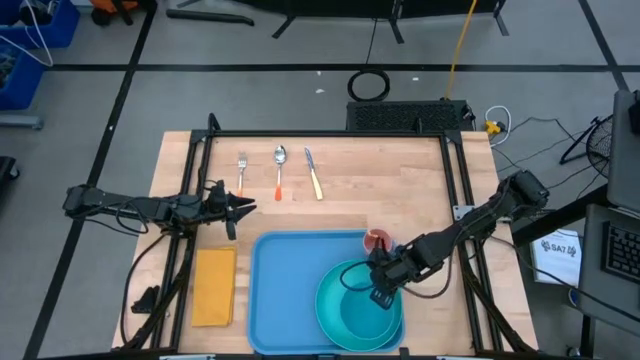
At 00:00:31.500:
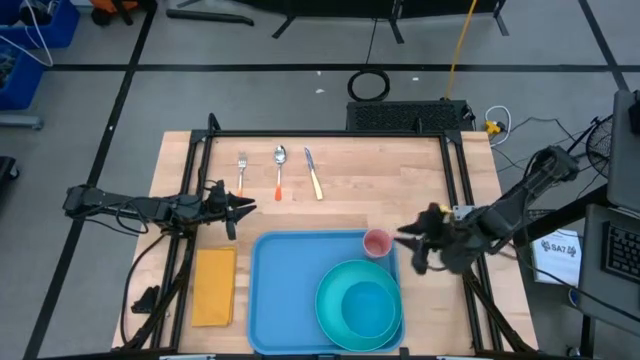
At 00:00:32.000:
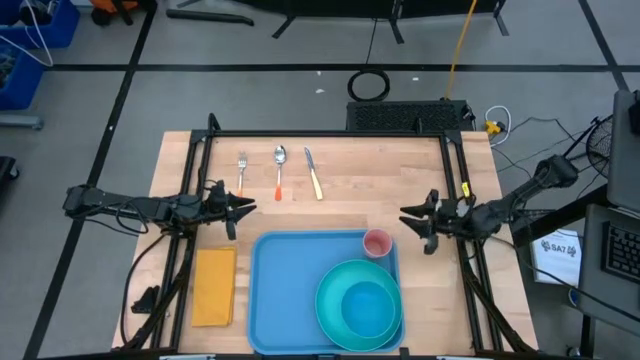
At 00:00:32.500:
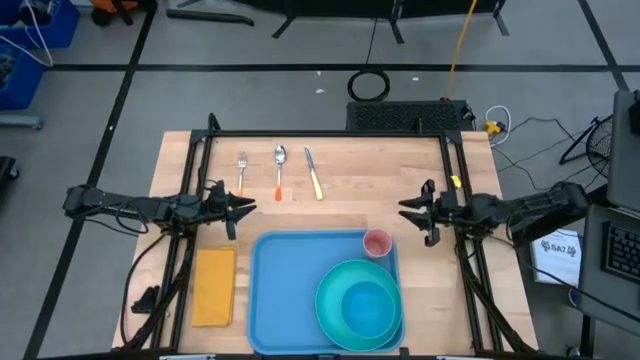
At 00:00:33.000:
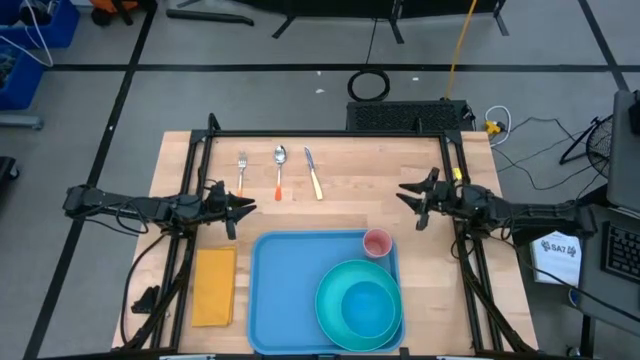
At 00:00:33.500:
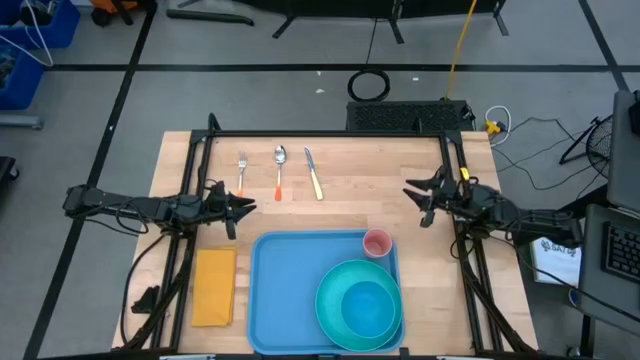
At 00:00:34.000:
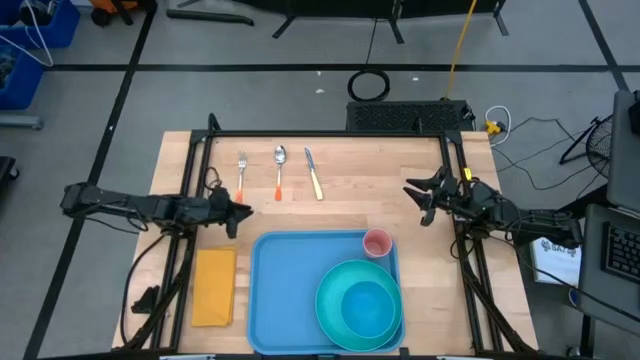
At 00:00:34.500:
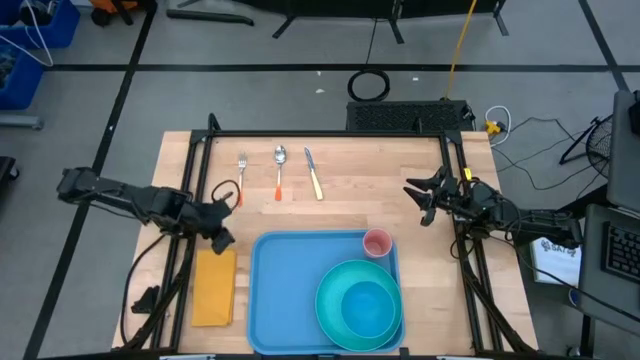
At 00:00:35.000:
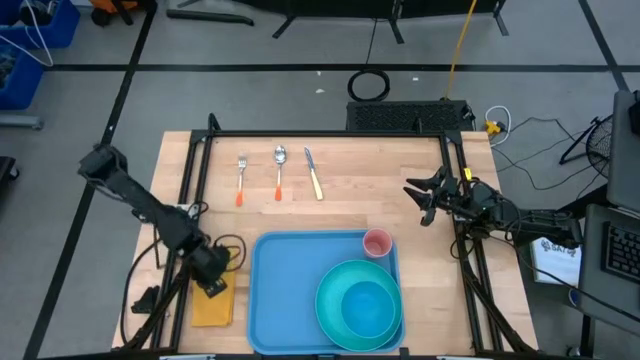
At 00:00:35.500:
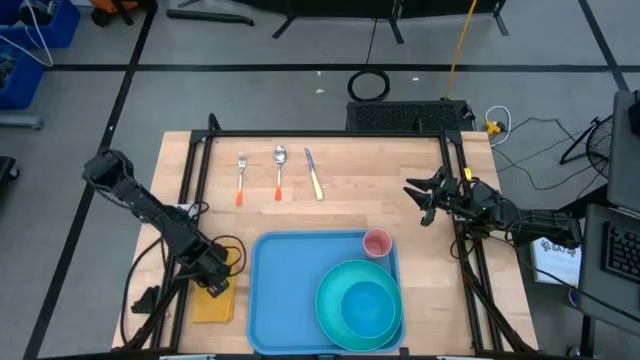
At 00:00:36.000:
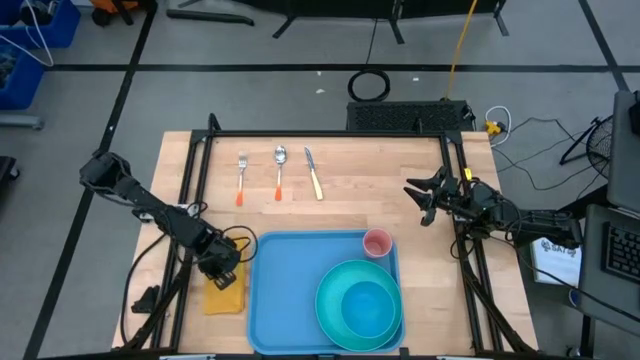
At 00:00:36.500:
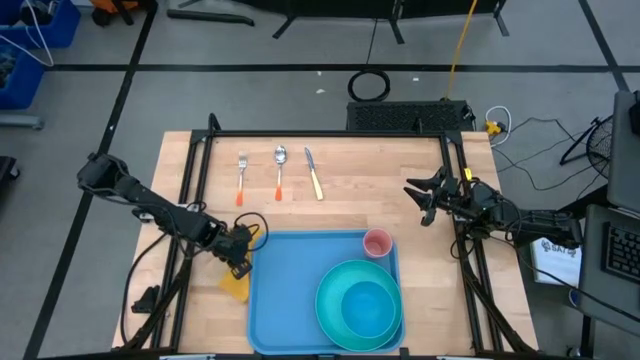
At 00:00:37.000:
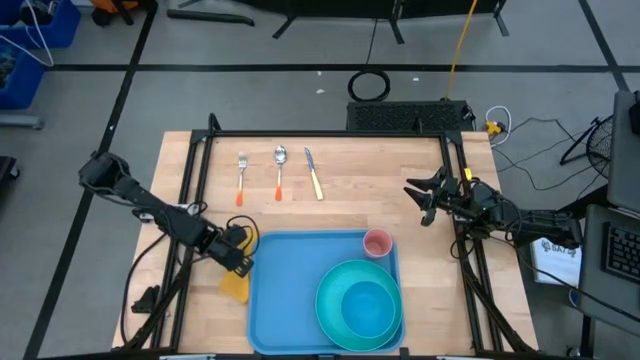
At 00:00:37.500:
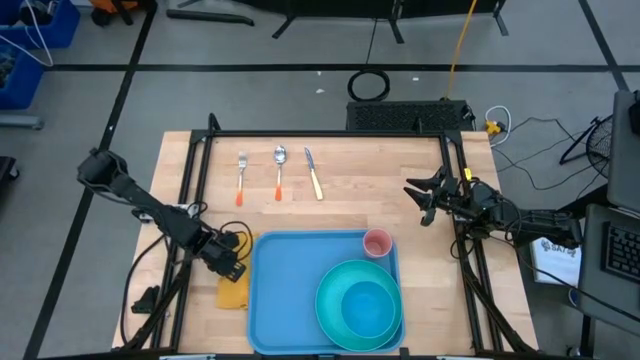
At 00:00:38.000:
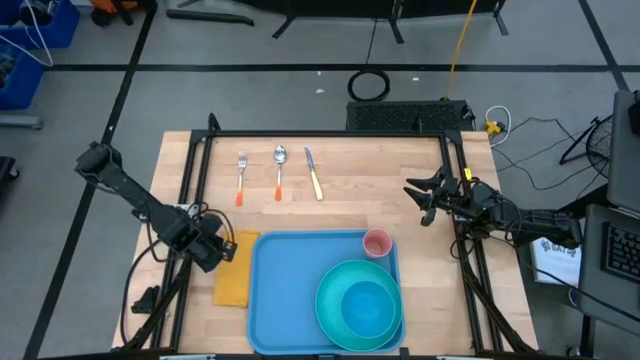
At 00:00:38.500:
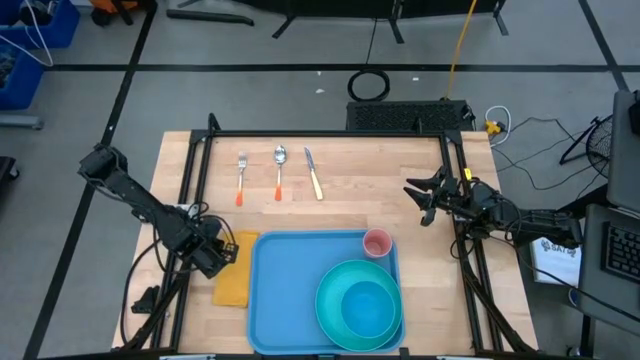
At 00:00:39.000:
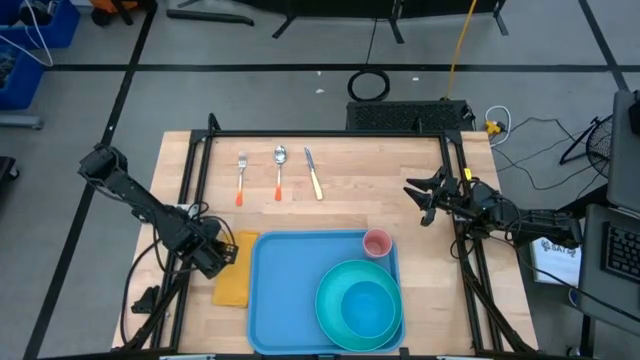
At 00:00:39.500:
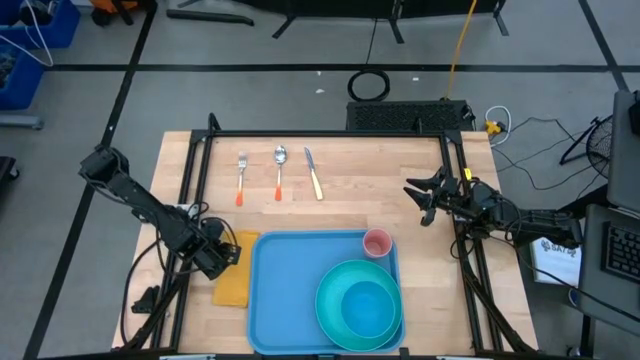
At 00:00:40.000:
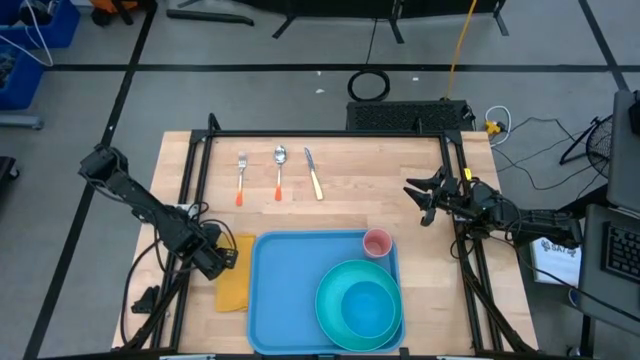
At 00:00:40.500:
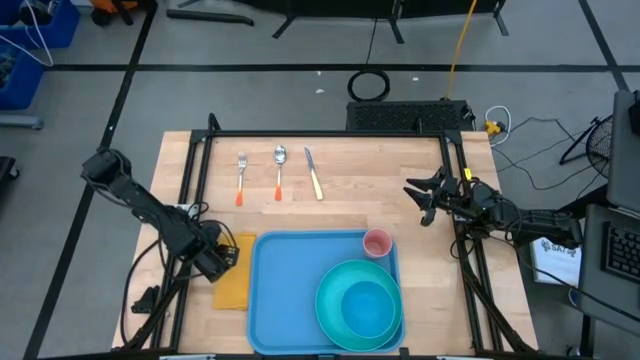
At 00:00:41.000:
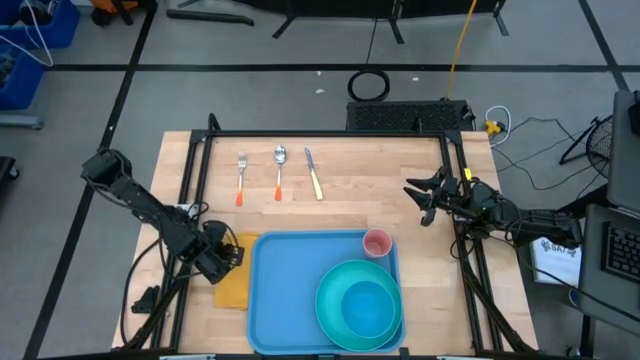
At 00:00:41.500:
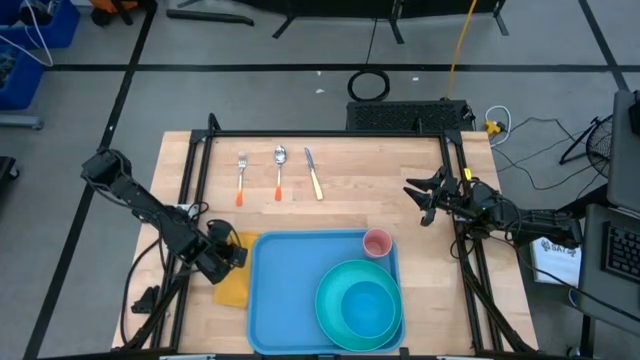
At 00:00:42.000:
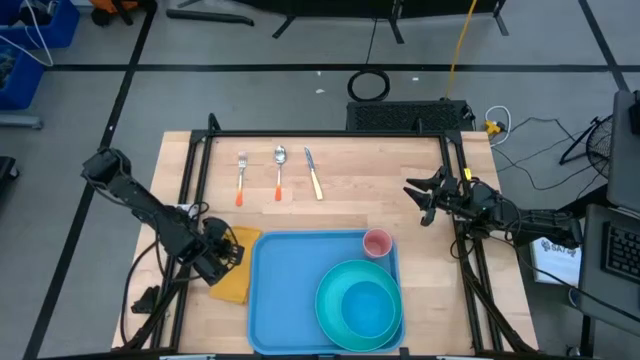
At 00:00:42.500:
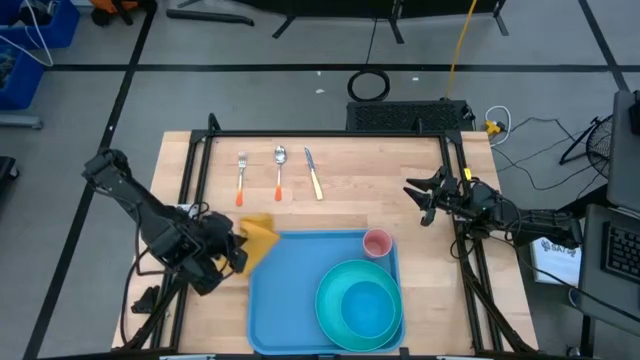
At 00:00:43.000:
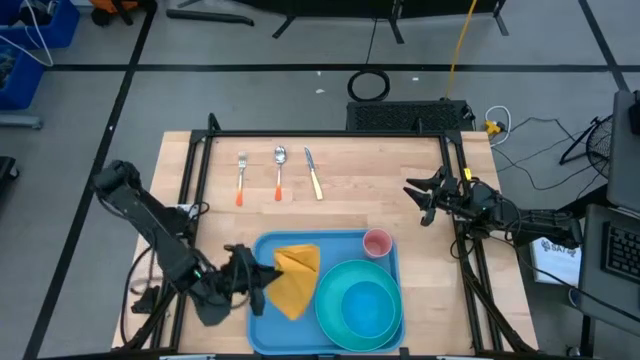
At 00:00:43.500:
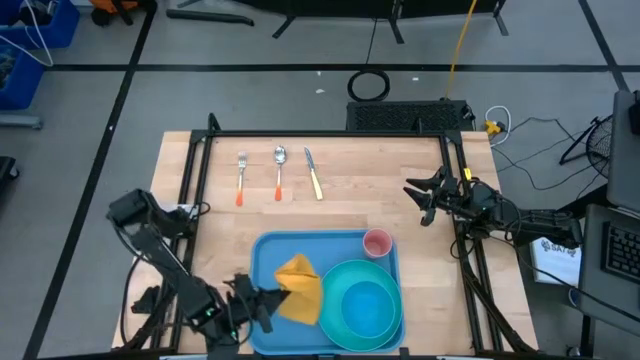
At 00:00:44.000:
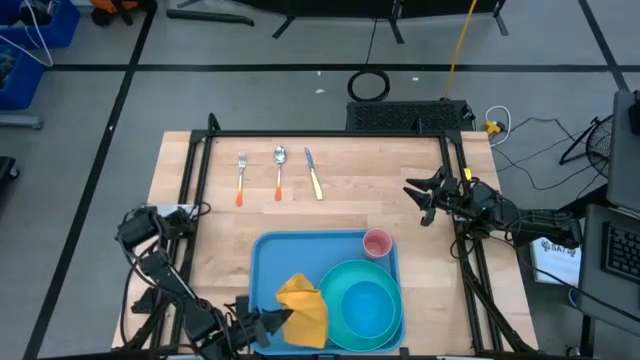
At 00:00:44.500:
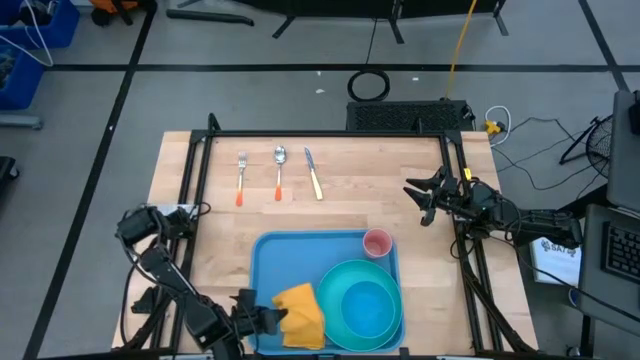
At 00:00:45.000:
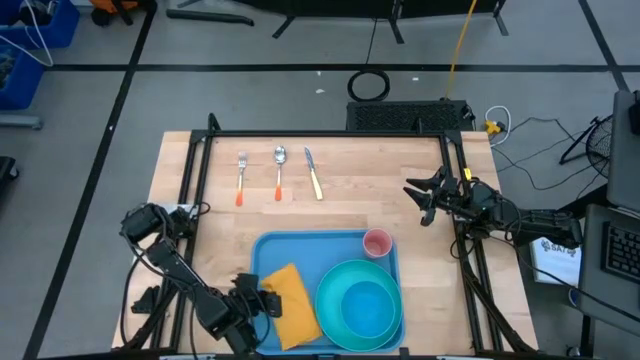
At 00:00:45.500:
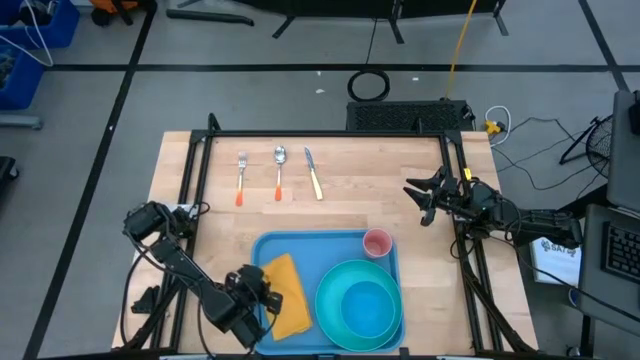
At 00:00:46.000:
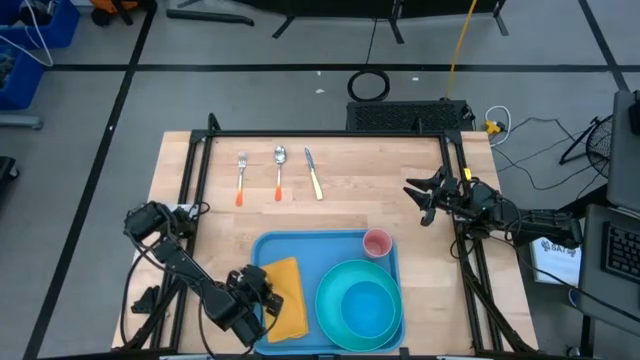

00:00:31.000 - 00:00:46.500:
Task: Set up tray
Put the yellow table napkin on the blue serving tray

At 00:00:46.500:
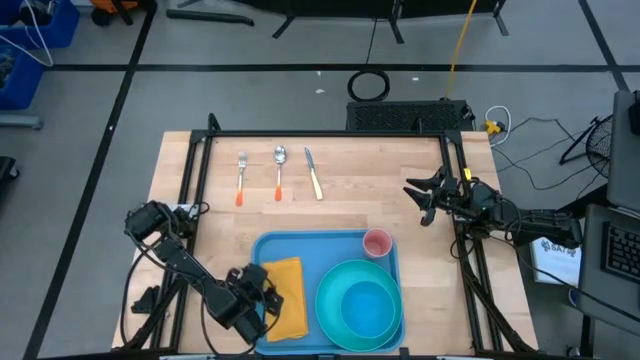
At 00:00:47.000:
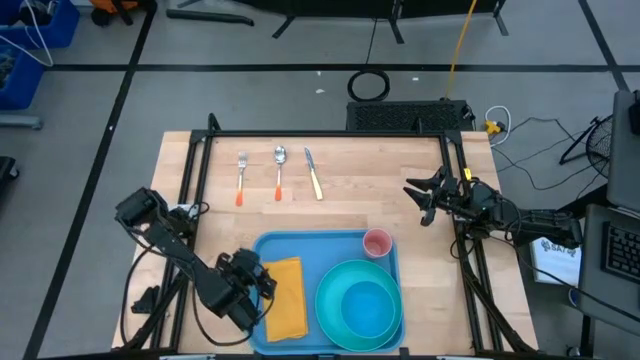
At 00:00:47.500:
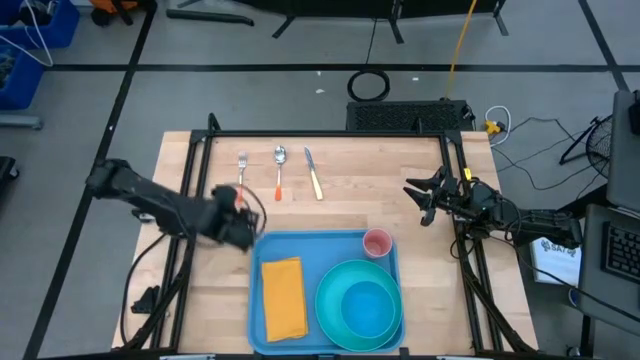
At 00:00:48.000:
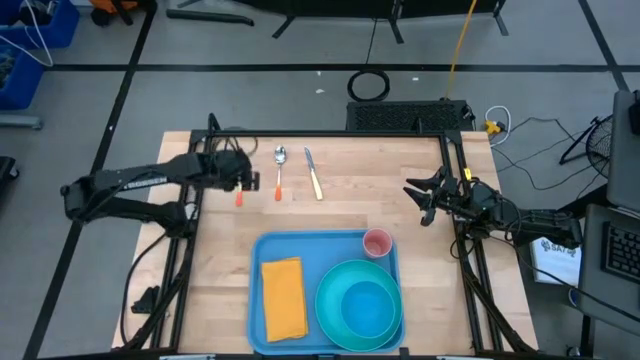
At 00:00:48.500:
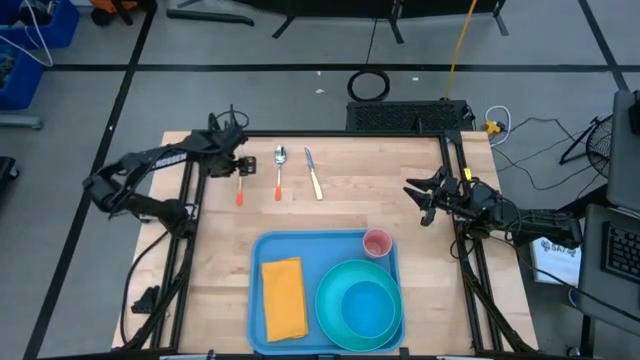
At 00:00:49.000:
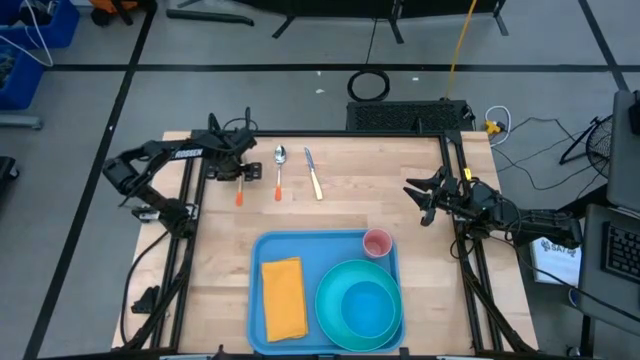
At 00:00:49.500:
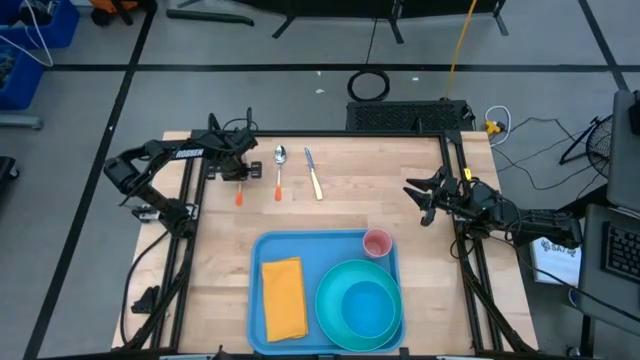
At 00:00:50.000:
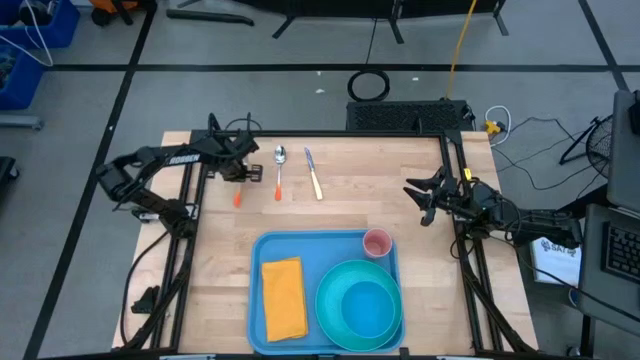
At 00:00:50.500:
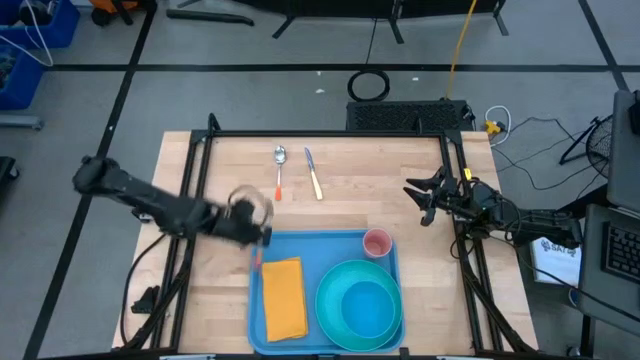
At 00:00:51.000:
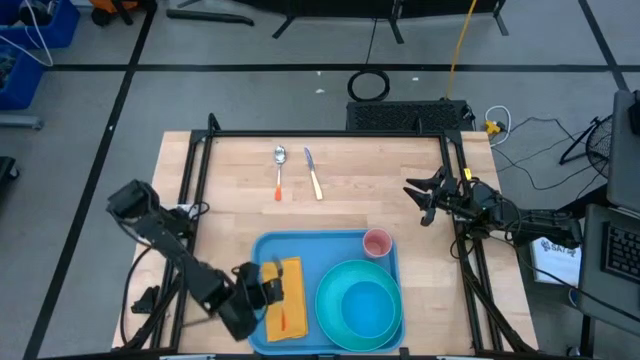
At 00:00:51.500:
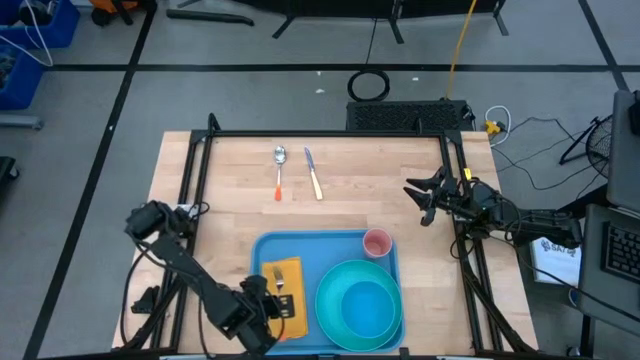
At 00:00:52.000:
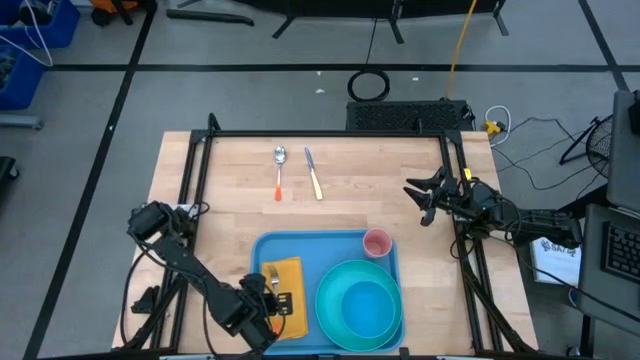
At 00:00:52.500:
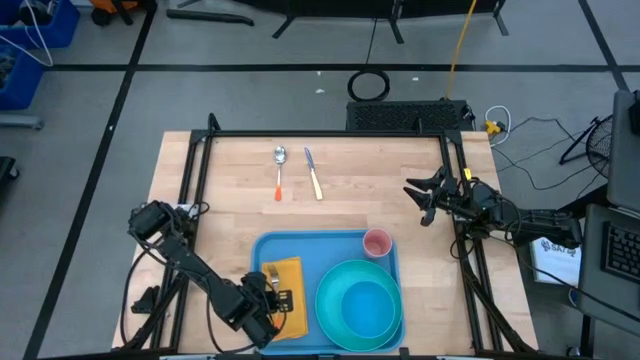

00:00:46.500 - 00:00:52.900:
Put the fork on the blue serving tray
